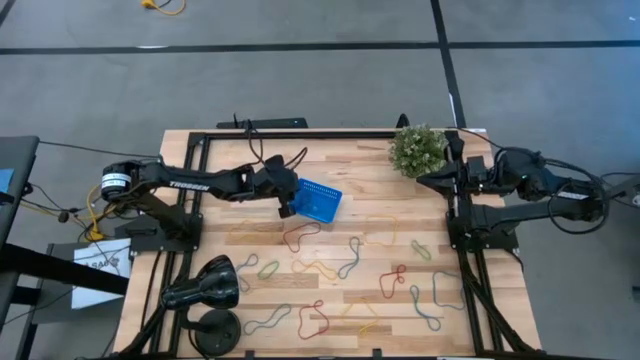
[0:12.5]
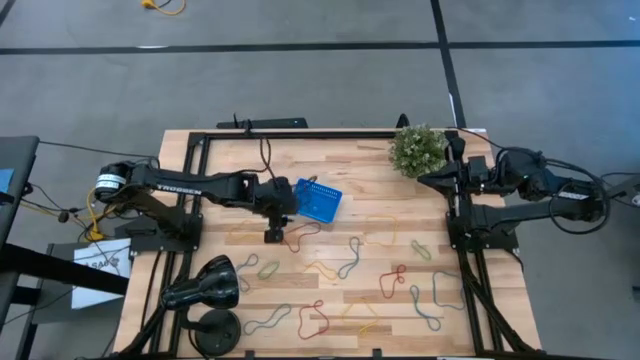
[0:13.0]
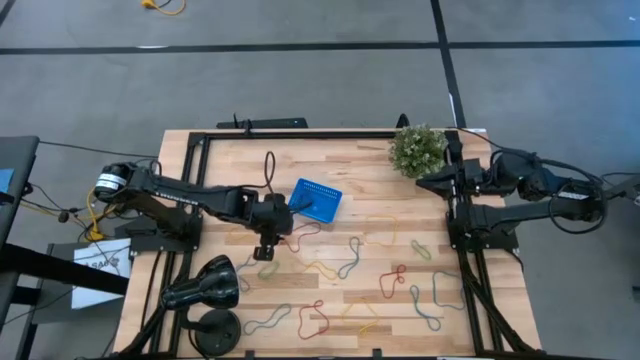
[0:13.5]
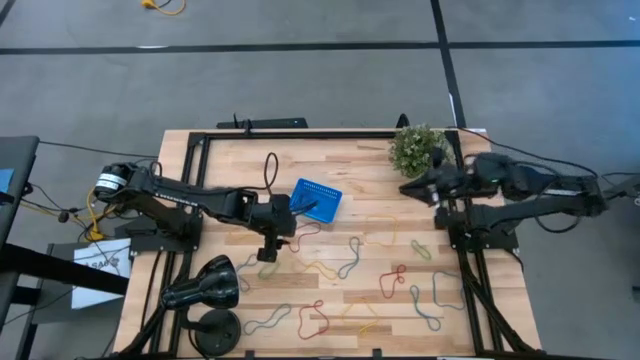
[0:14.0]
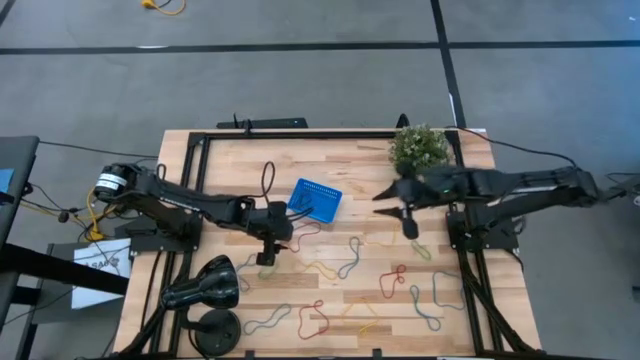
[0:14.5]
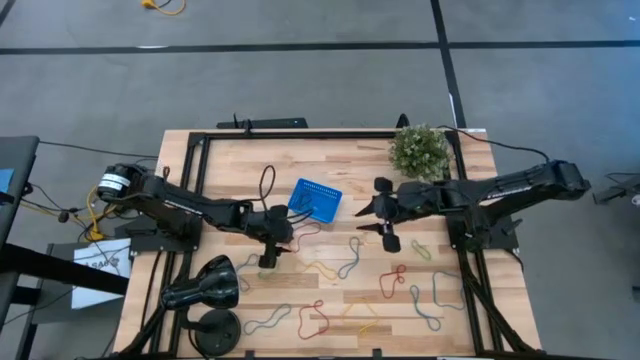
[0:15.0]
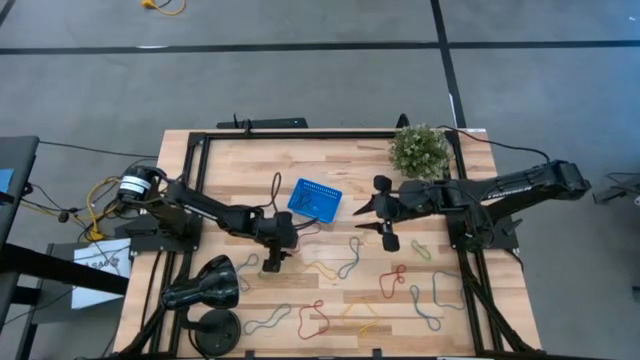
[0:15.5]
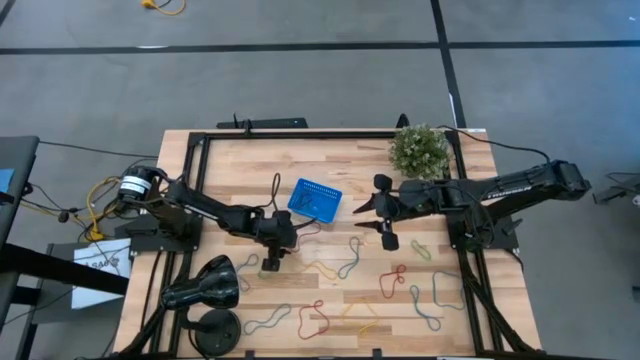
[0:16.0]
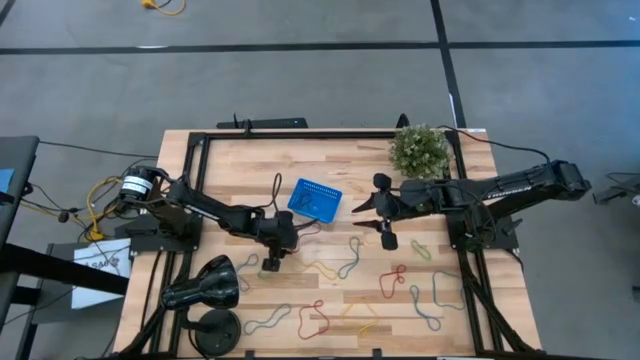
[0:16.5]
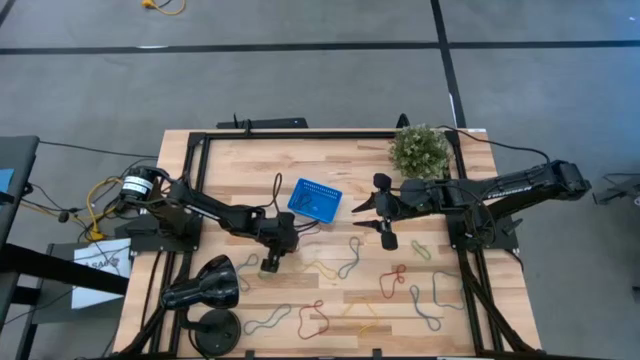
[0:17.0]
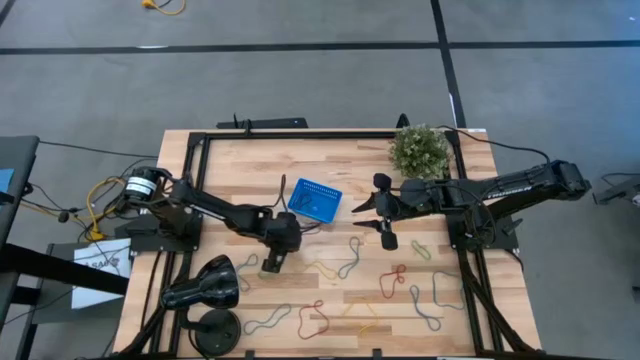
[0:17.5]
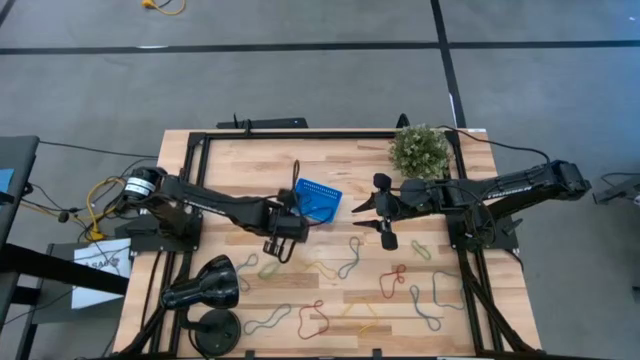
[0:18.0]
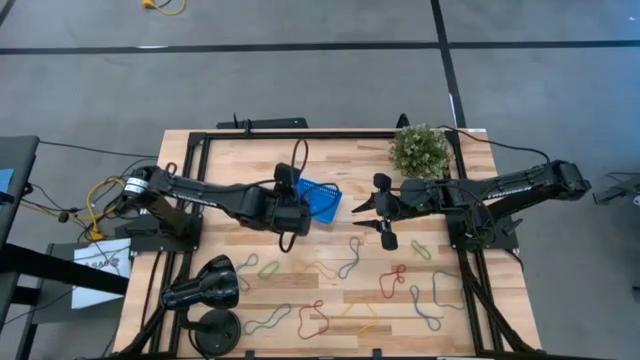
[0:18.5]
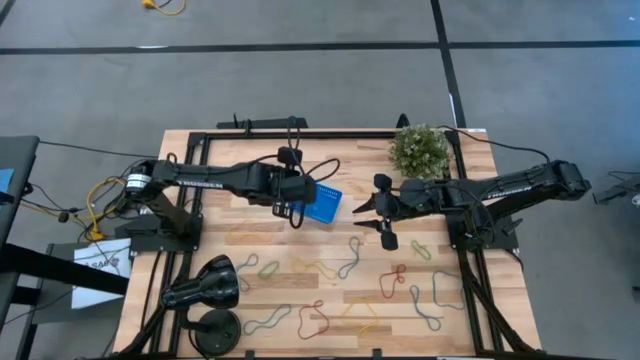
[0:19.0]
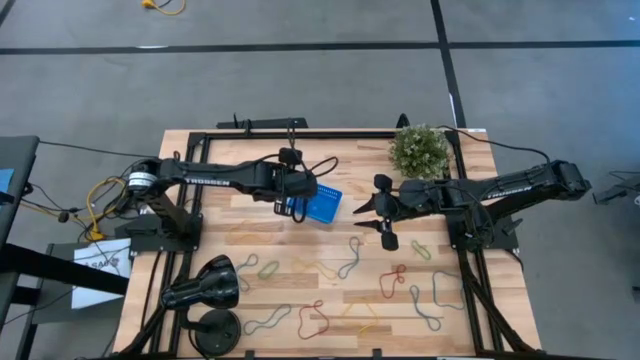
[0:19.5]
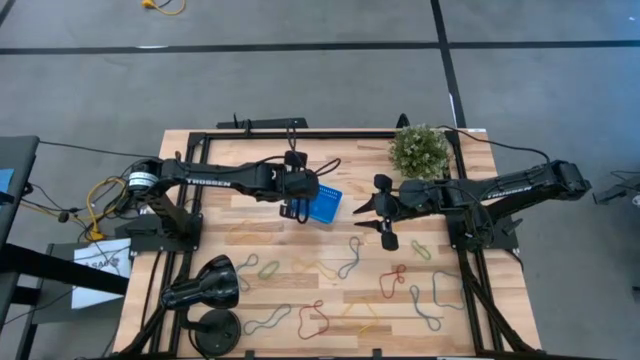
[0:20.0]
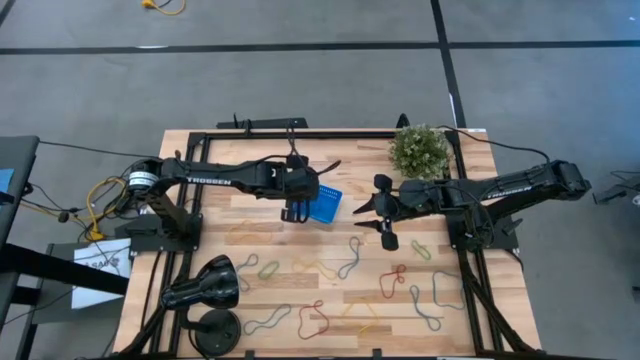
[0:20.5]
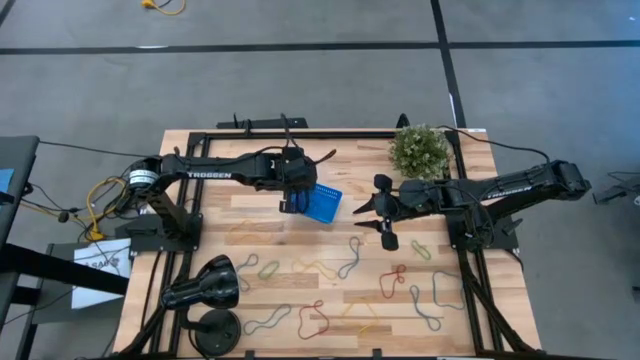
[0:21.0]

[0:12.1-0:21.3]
Task: Pick and place items into bin
Put the red rubber band into the blue bin

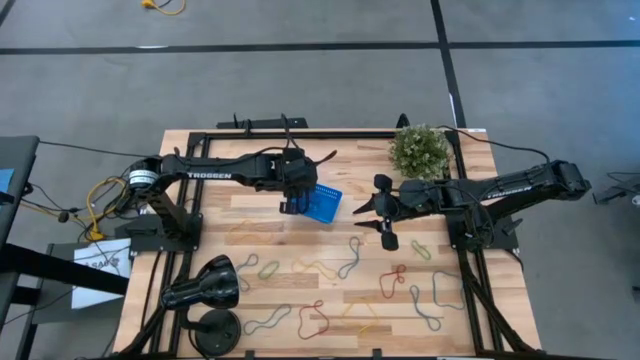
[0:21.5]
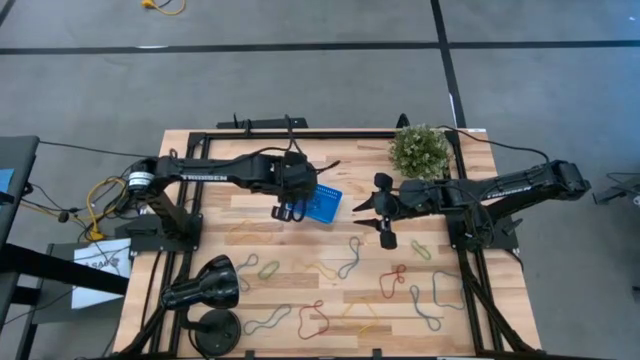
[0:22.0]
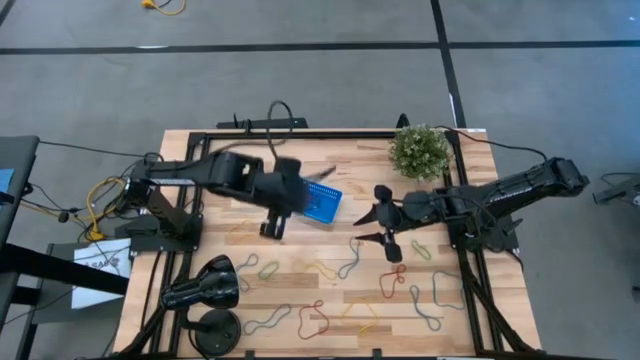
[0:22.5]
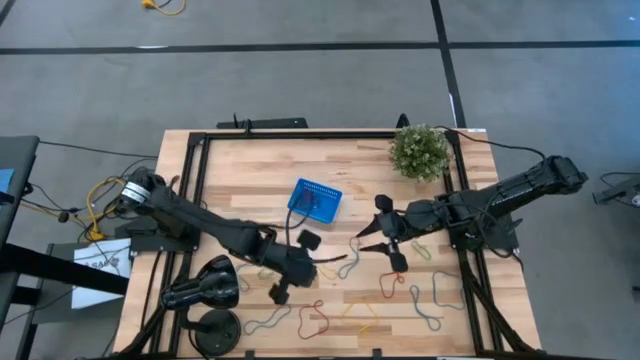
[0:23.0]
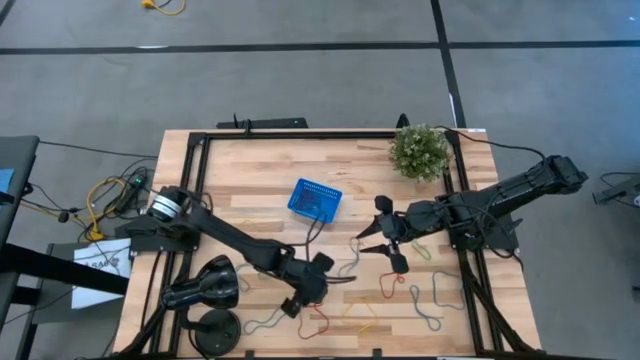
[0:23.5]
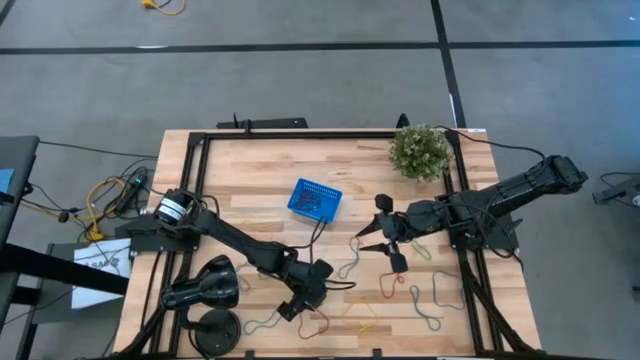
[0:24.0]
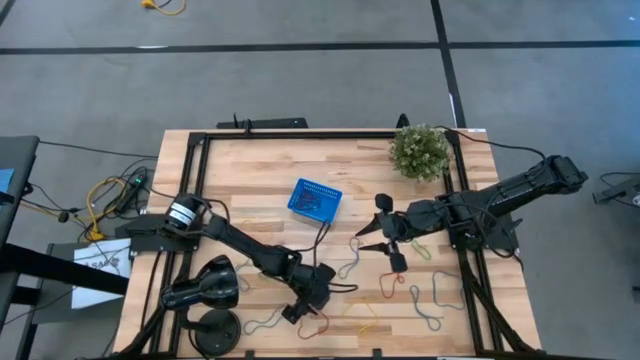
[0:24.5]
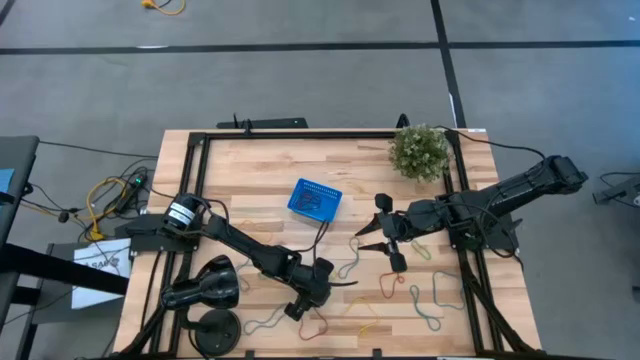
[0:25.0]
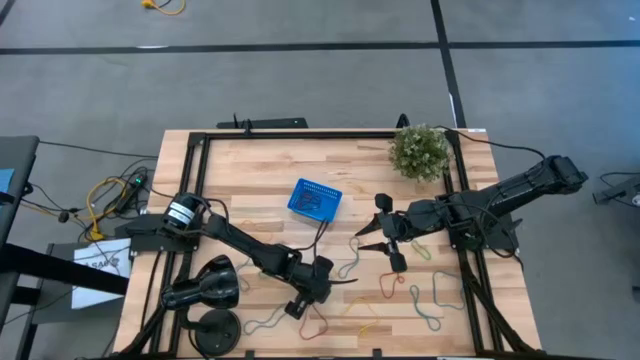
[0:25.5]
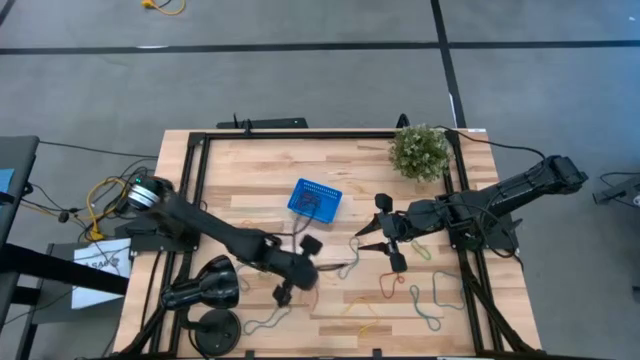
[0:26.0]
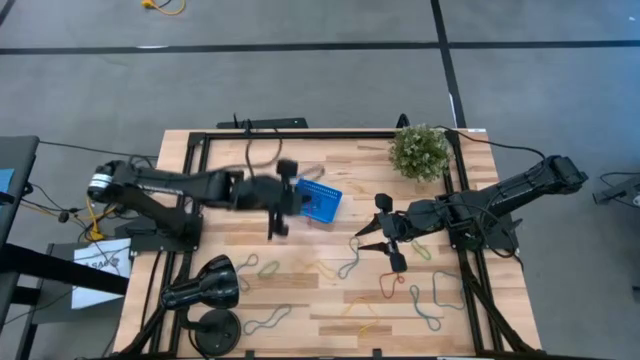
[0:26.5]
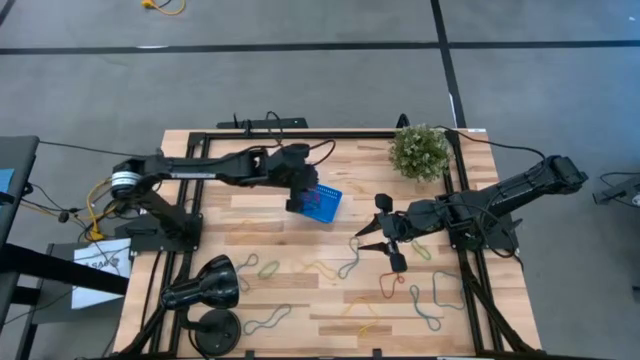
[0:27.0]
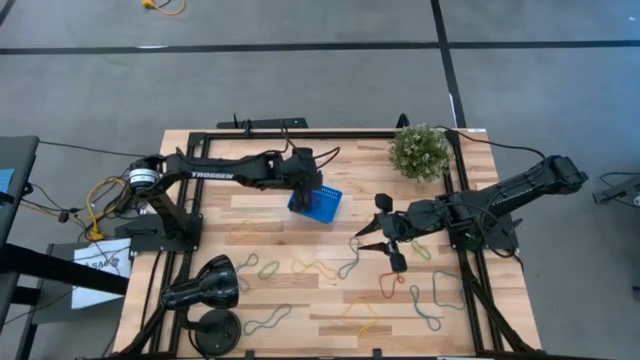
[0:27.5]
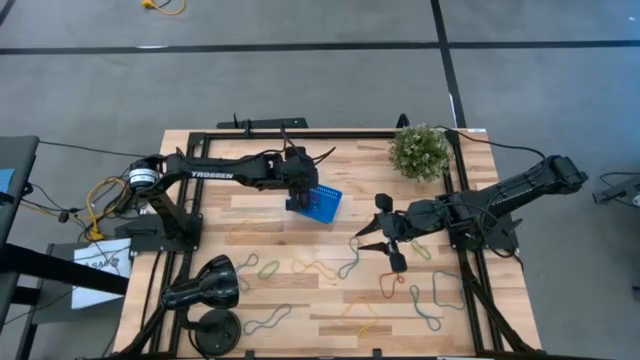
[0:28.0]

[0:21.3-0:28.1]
Put the red rubber band into the blue bin

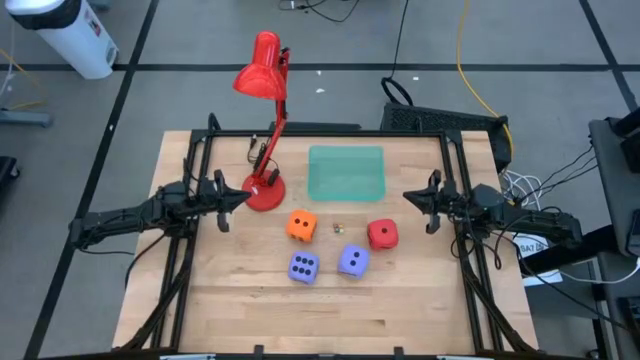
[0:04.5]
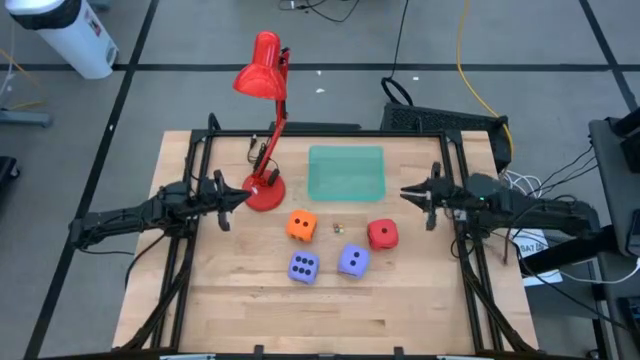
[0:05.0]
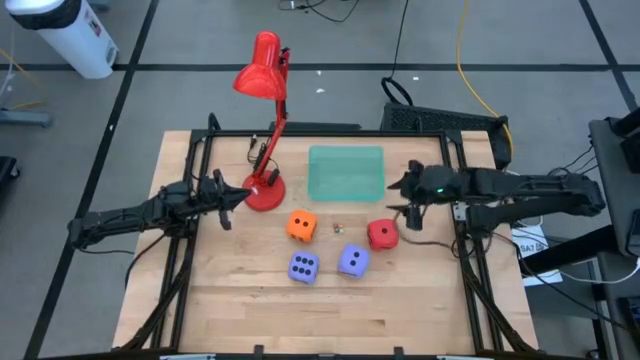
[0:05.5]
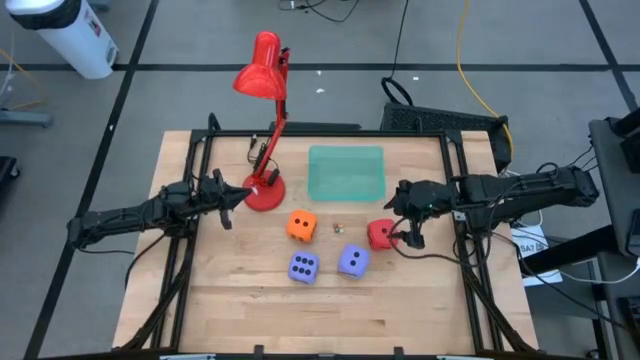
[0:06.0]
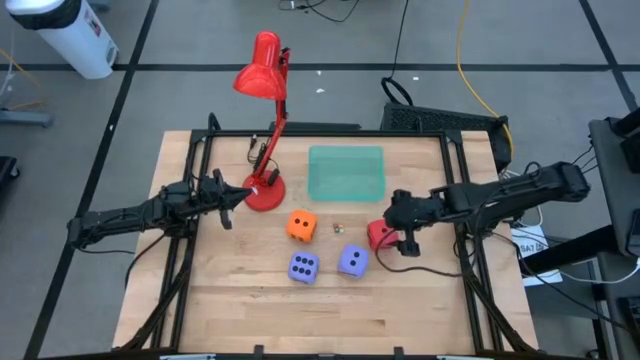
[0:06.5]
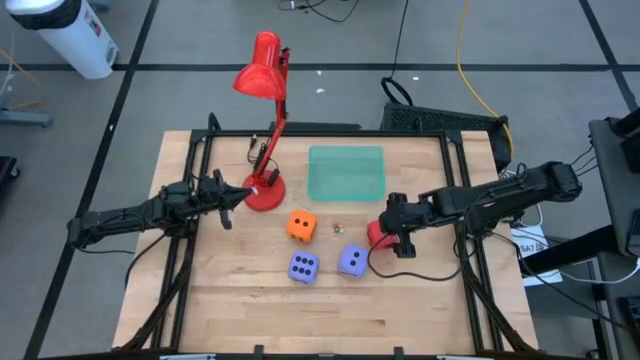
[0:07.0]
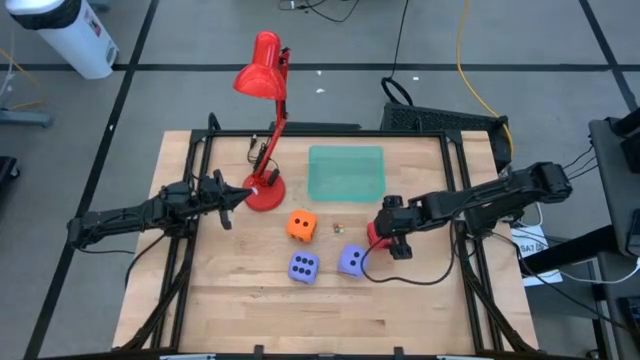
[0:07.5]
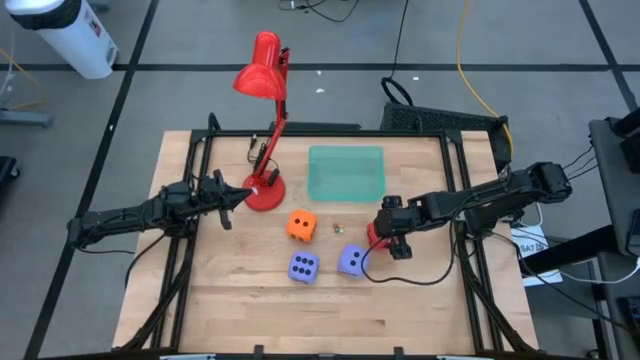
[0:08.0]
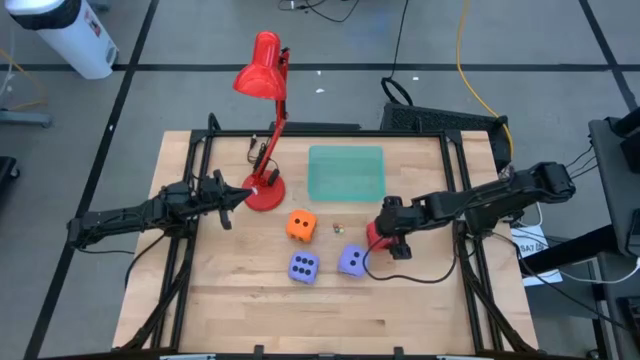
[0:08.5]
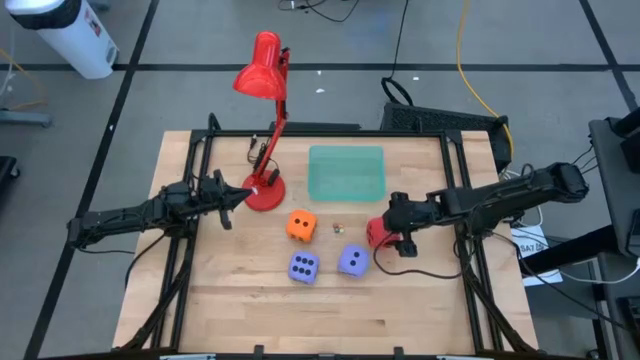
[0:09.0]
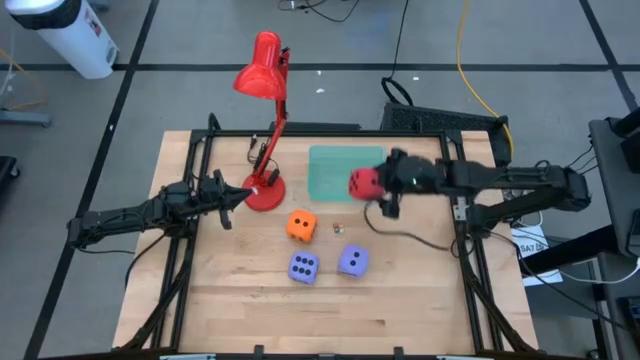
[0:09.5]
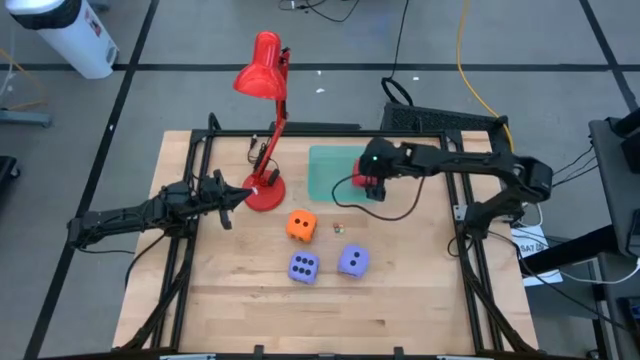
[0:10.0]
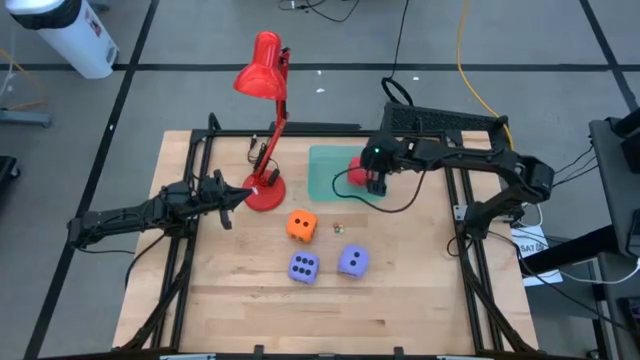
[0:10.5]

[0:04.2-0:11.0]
Task: Pick & Place Dice
Put the large red die into the green bin
